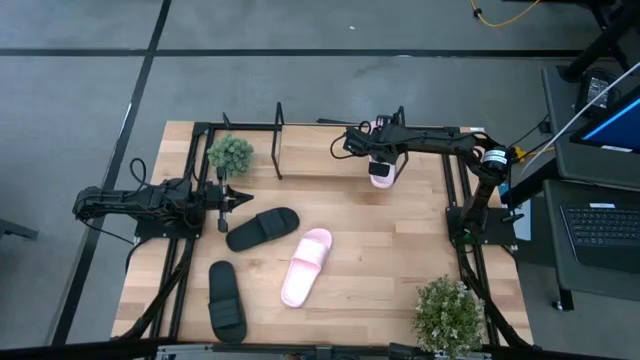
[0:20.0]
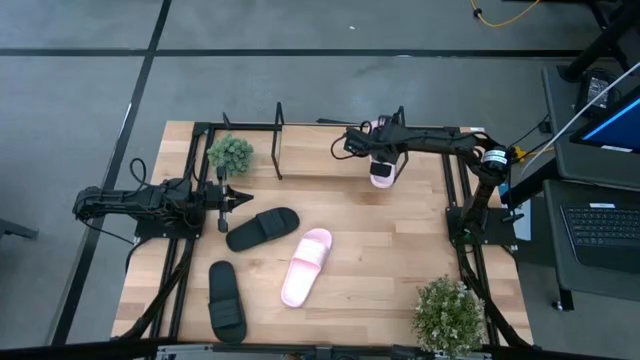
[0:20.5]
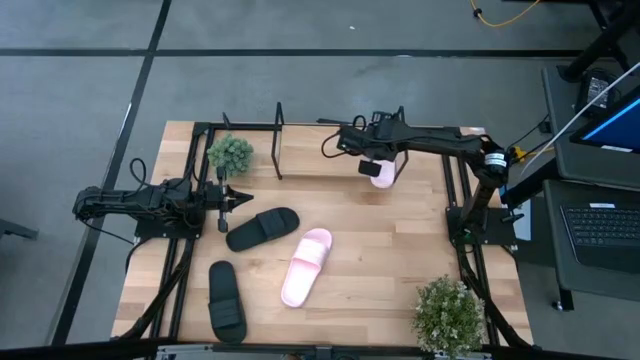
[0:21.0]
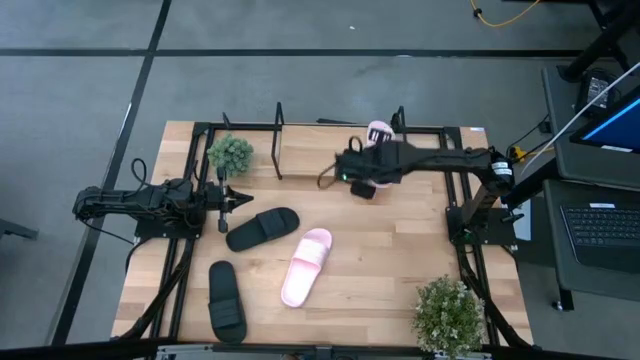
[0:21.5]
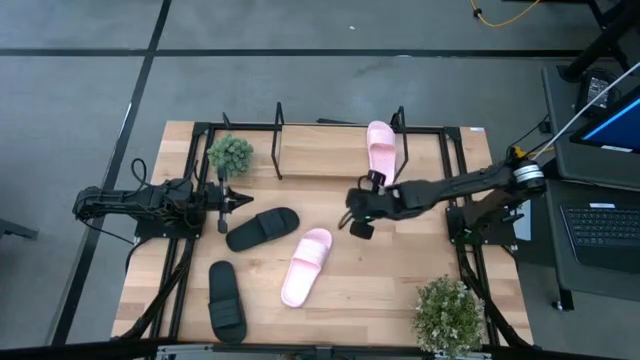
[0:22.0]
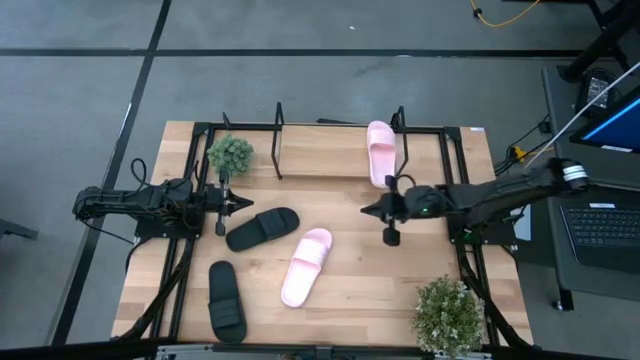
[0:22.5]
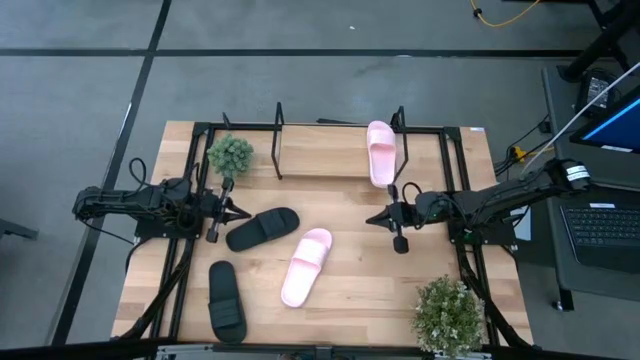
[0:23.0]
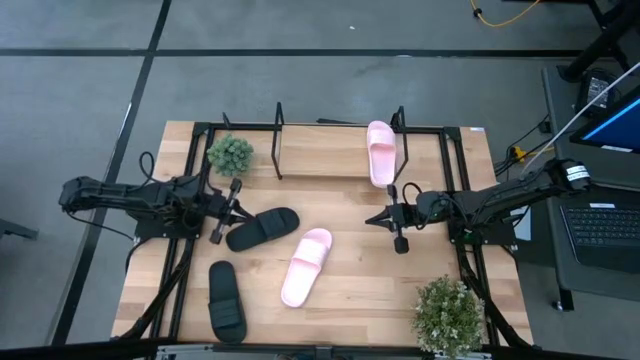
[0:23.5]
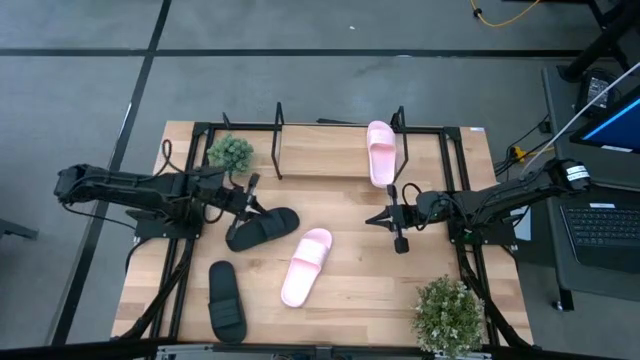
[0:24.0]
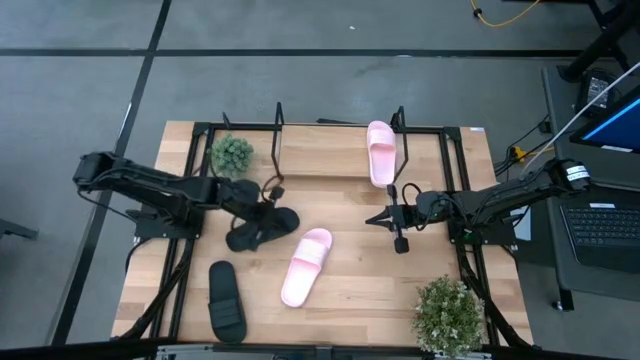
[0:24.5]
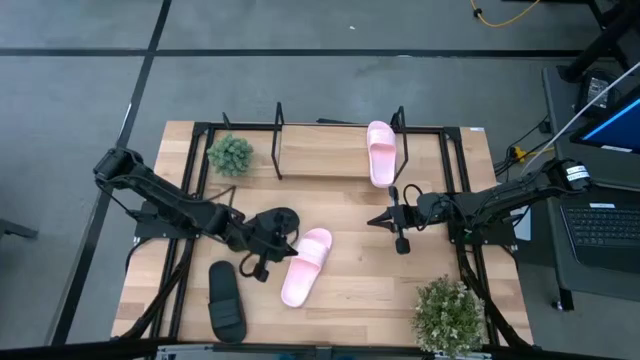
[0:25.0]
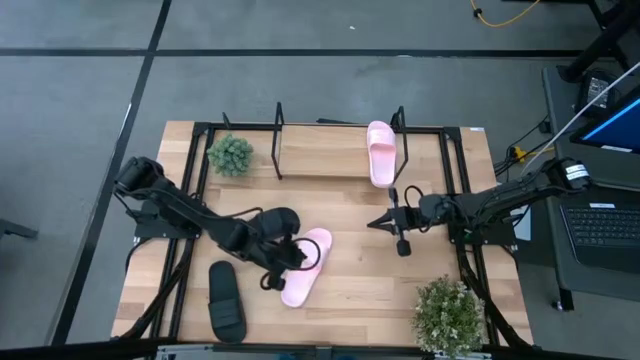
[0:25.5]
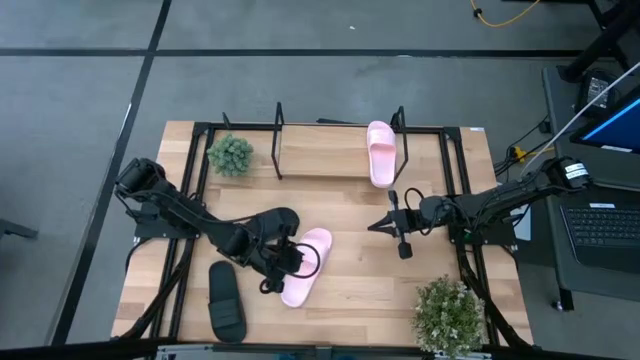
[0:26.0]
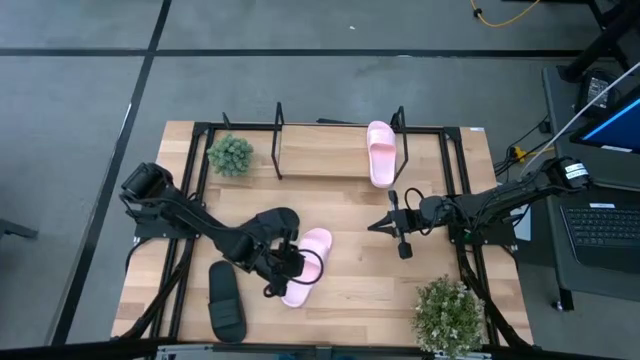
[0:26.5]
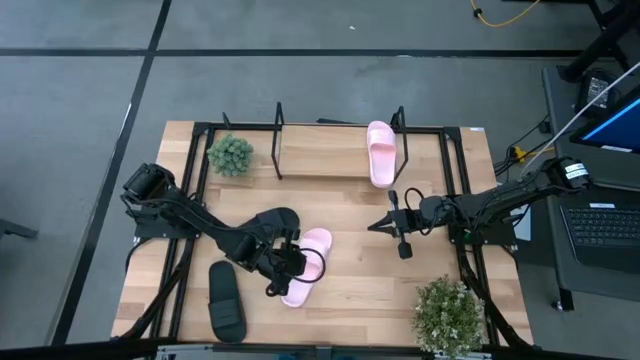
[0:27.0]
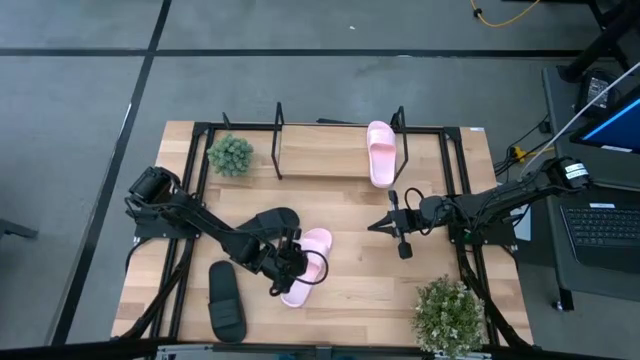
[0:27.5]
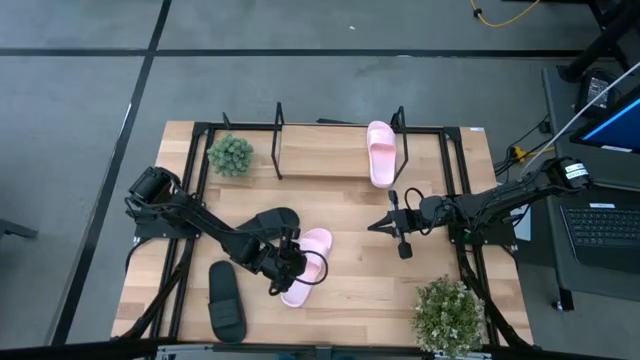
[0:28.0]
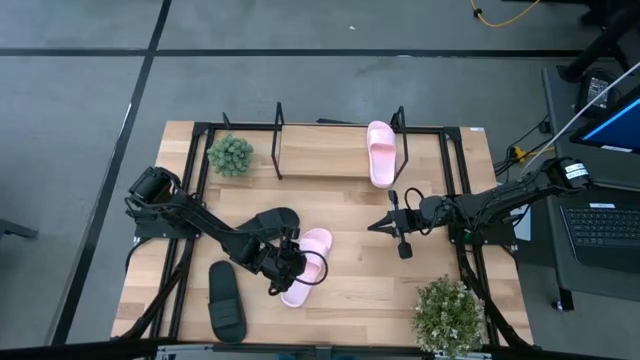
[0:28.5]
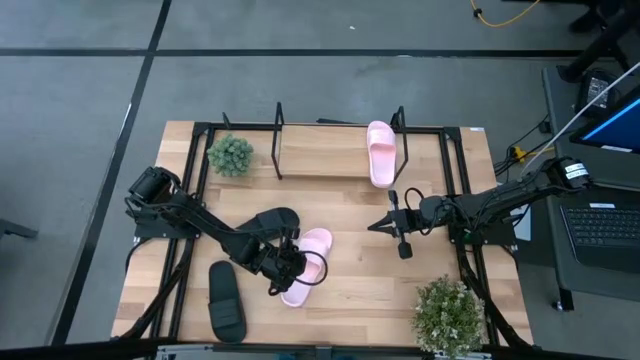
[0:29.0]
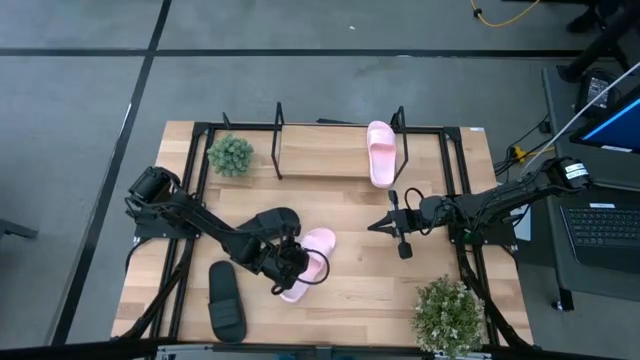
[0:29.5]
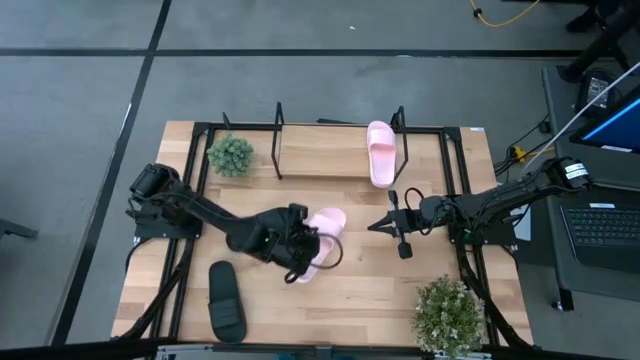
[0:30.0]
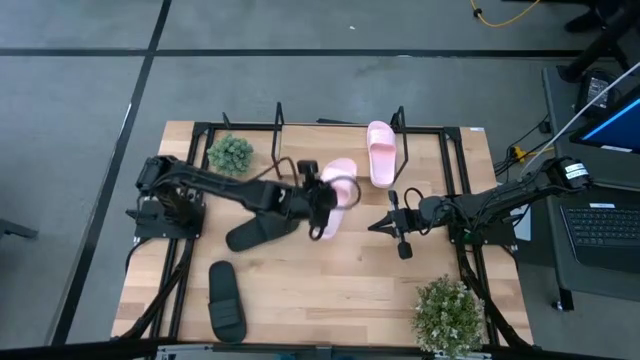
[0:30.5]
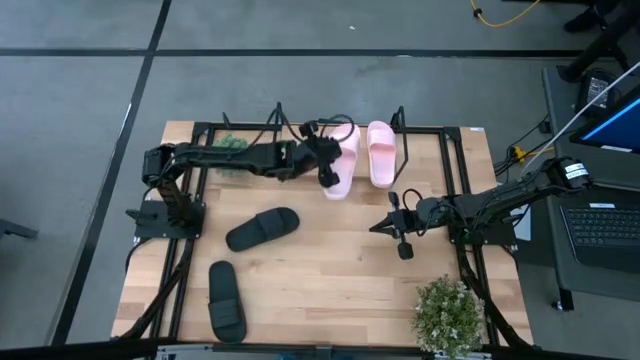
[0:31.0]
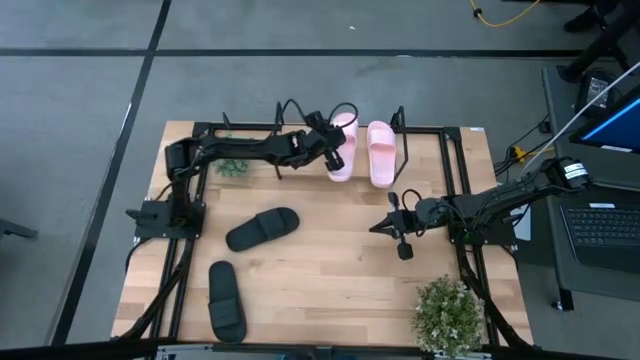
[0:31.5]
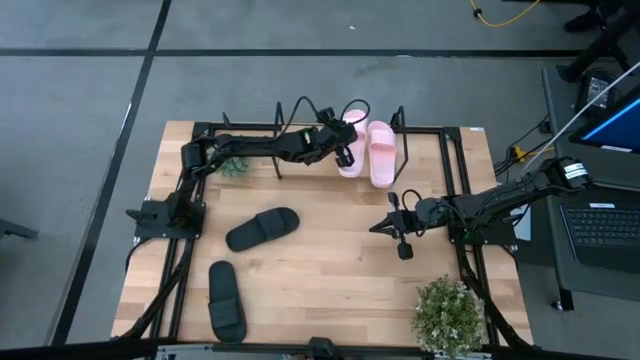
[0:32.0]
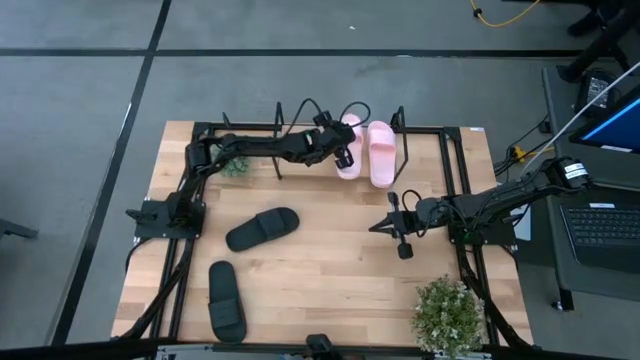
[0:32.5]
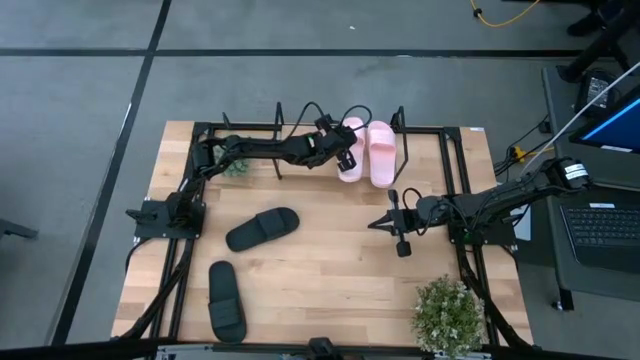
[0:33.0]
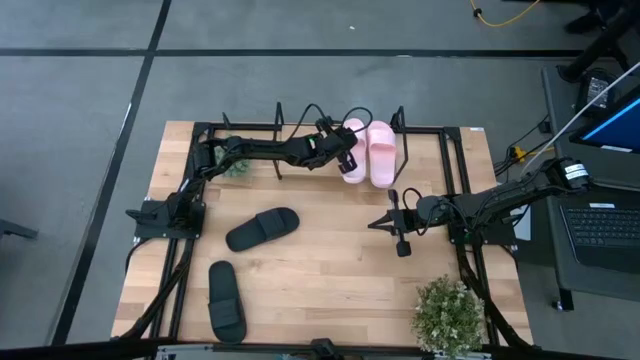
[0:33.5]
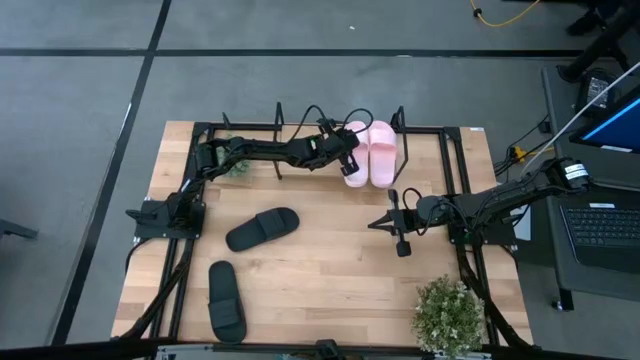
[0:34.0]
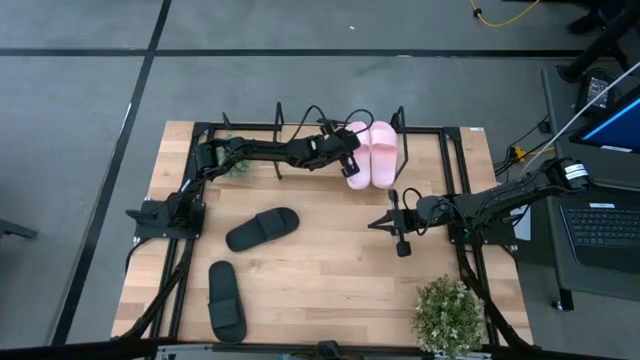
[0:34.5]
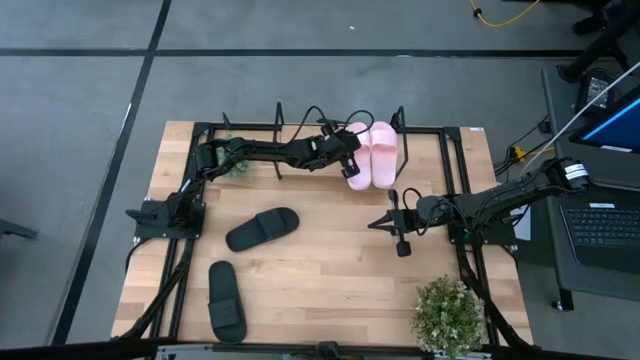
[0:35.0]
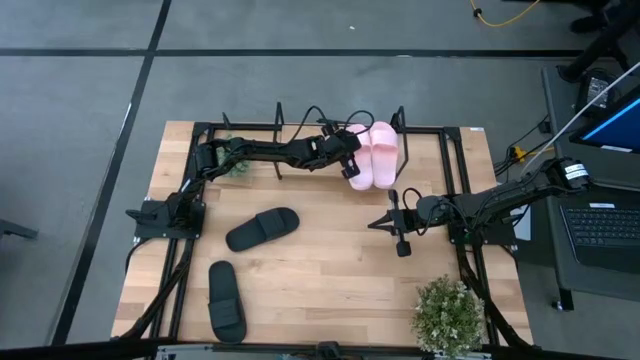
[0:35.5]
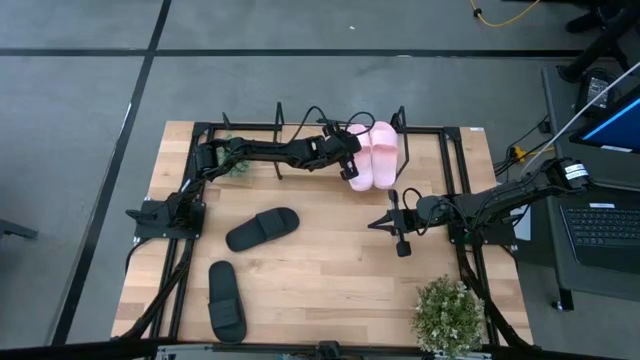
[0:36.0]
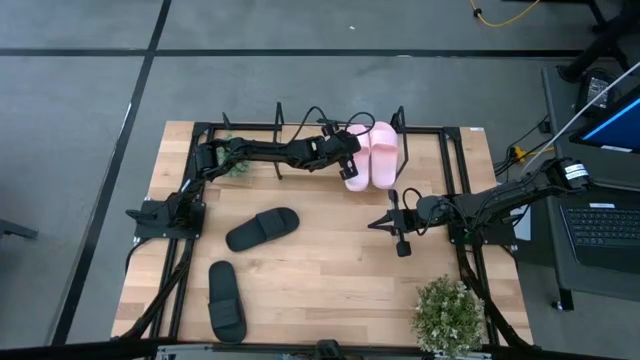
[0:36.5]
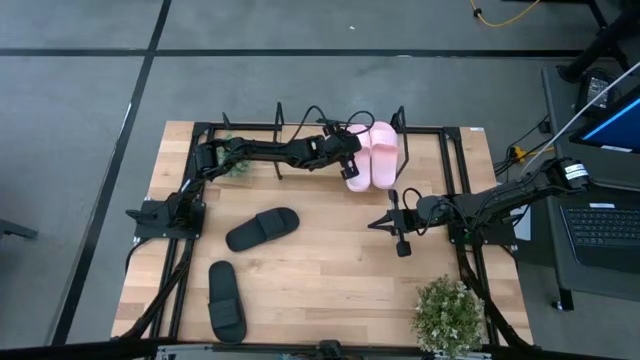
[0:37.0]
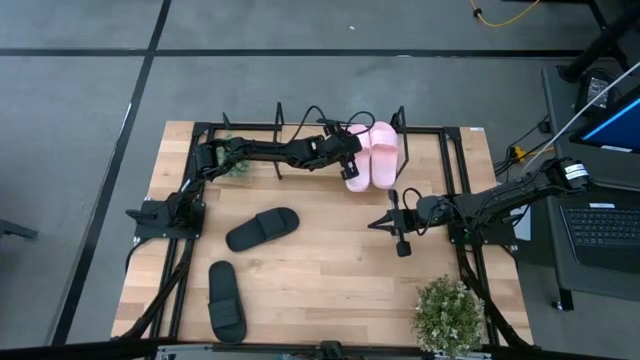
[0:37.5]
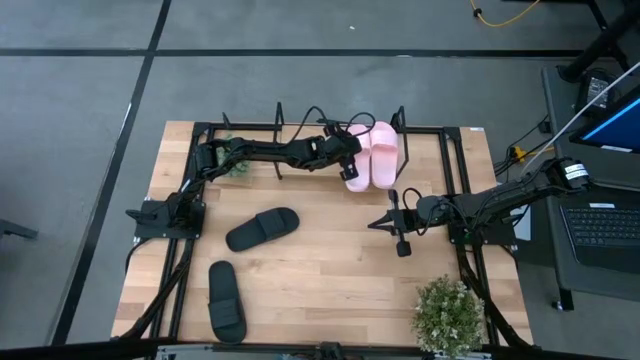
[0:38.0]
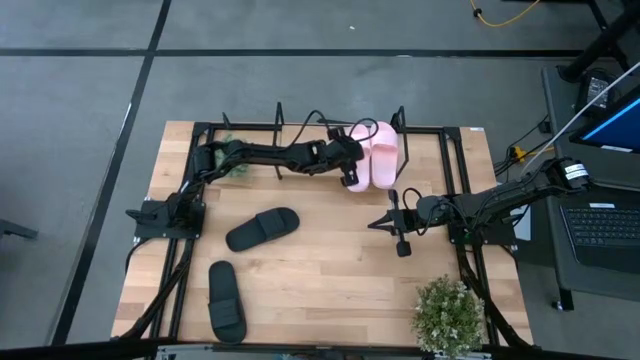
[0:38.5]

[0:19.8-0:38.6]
Task: Pick and place slides into the shelf
Put the pink slides on the shelf
